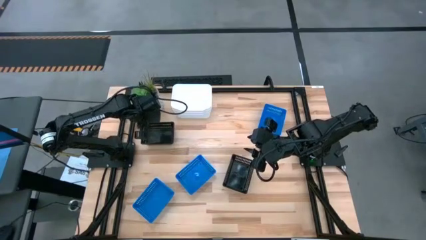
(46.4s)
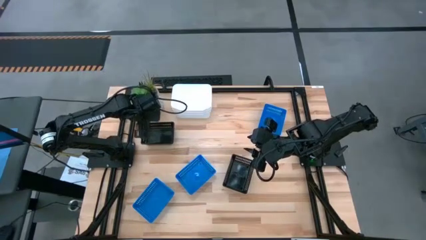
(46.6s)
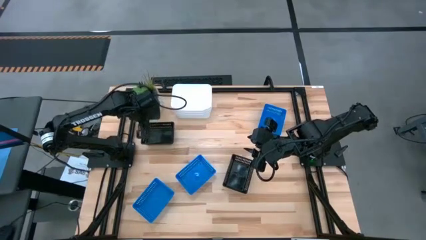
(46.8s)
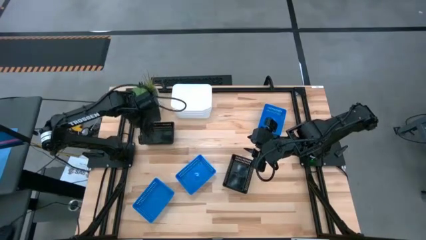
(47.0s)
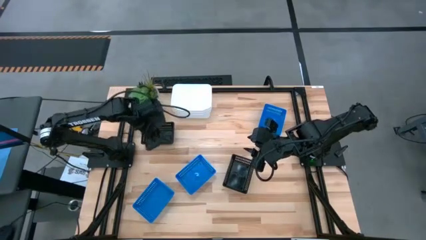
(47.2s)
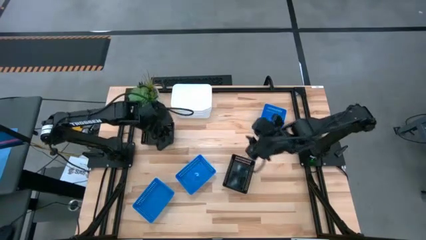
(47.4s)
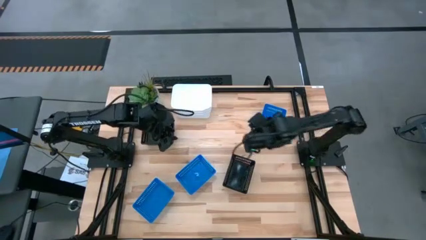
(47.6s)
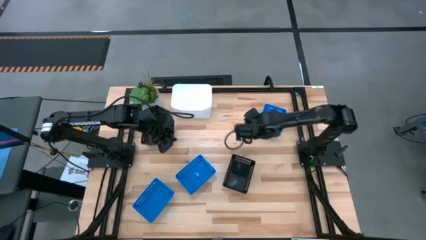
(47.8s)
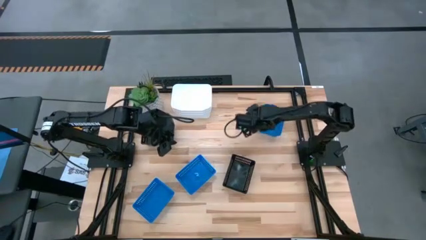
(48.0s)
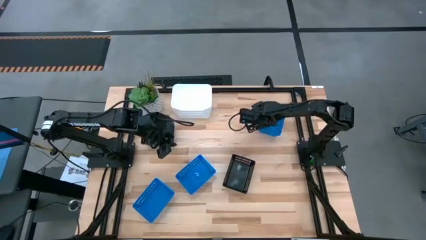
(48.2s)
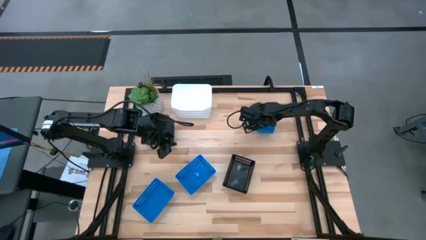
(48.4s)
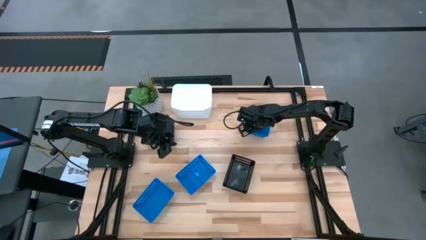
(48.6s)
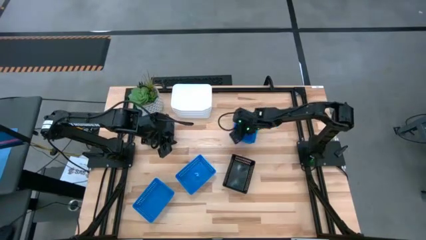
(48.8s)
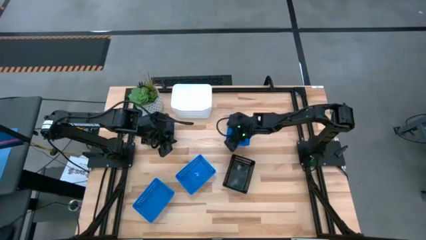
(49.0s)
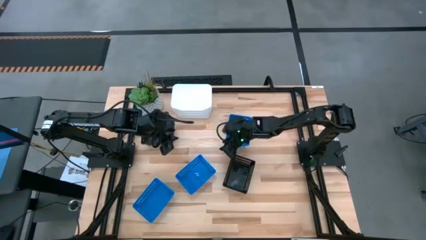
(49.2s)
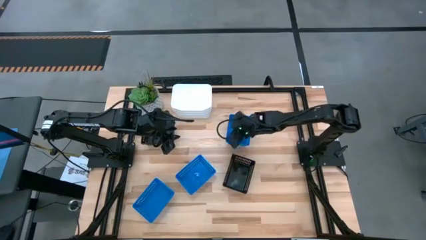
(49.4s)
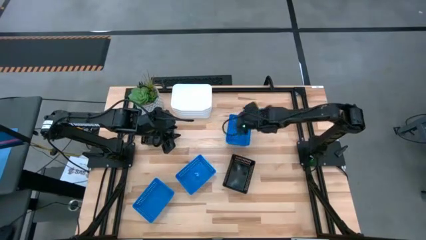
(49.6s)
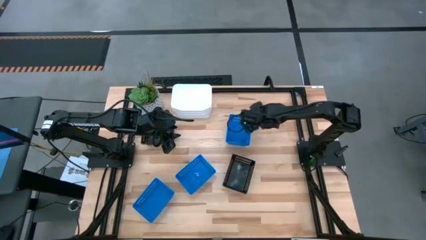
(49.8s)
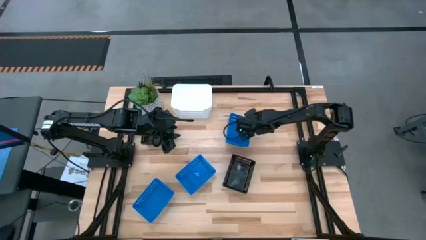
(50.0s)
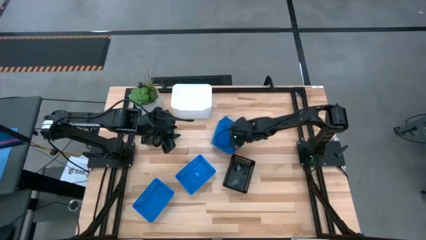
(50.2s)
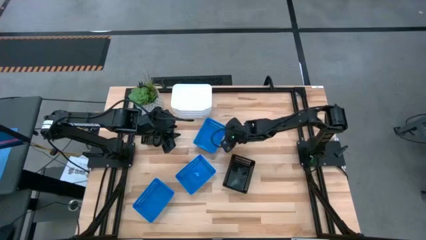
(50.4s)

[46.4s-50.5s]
Move the blue bin from top right to middle table

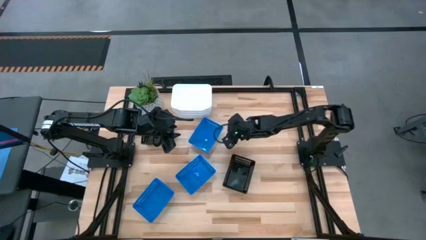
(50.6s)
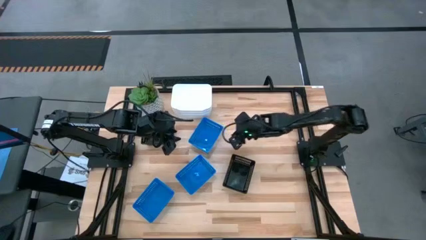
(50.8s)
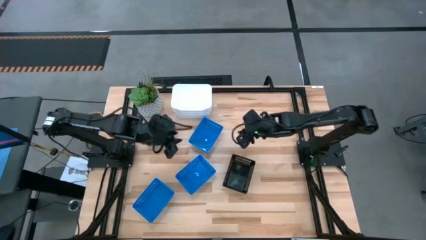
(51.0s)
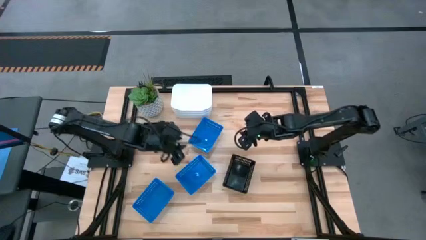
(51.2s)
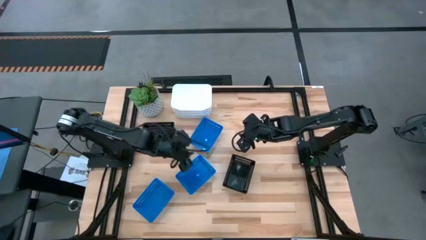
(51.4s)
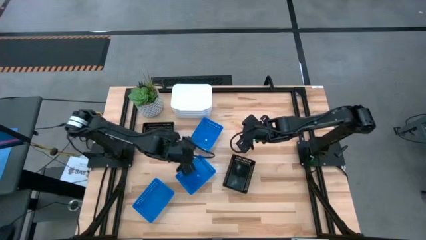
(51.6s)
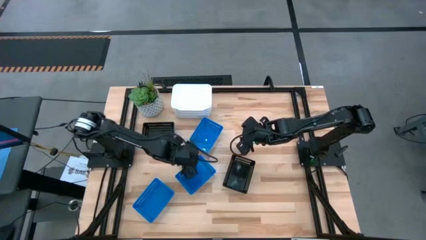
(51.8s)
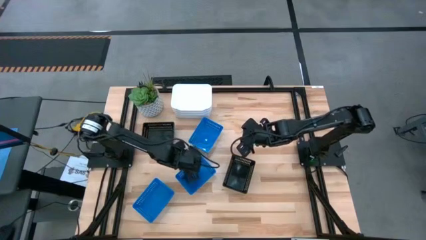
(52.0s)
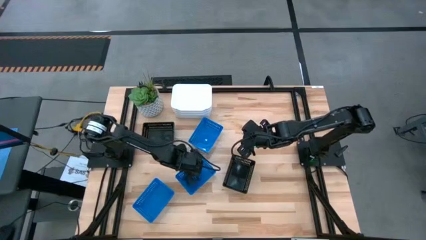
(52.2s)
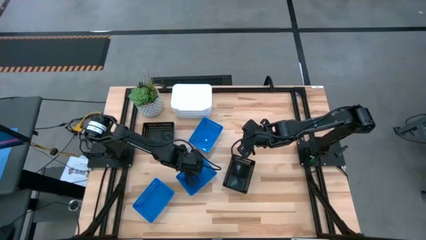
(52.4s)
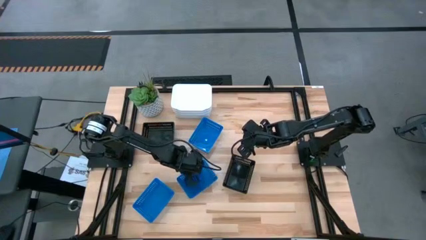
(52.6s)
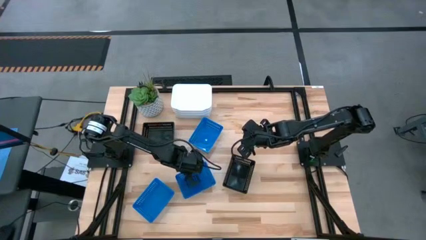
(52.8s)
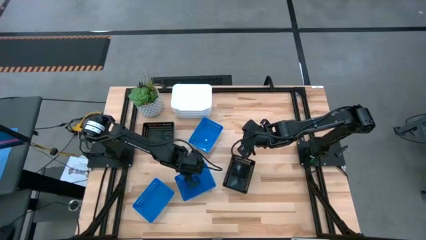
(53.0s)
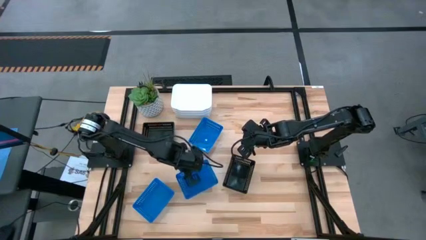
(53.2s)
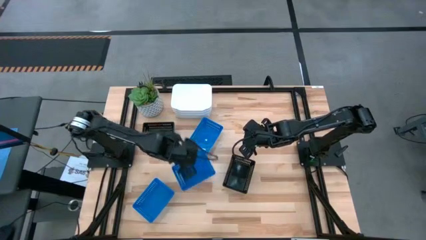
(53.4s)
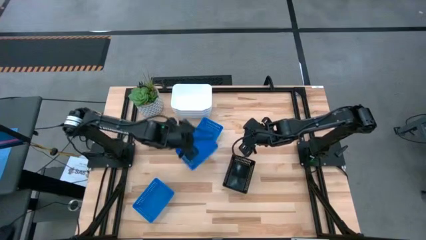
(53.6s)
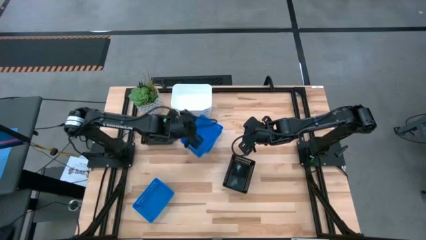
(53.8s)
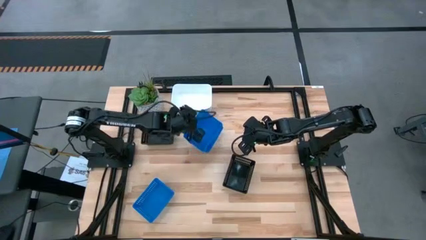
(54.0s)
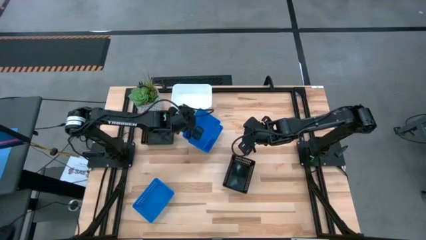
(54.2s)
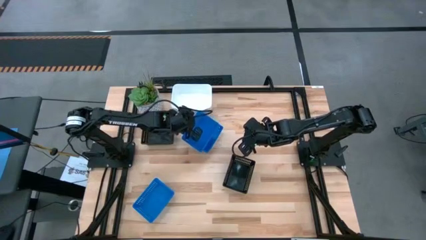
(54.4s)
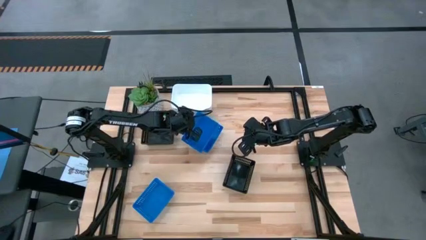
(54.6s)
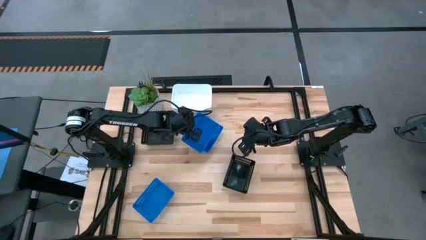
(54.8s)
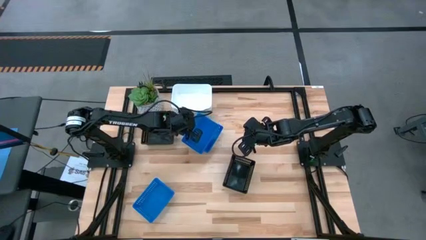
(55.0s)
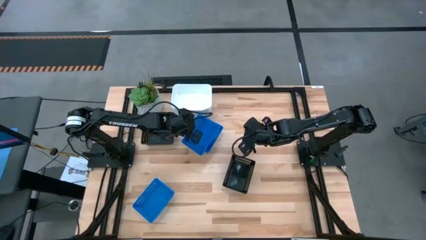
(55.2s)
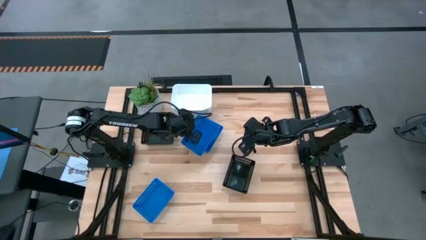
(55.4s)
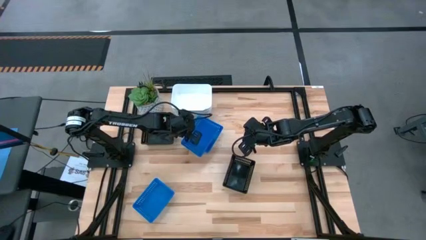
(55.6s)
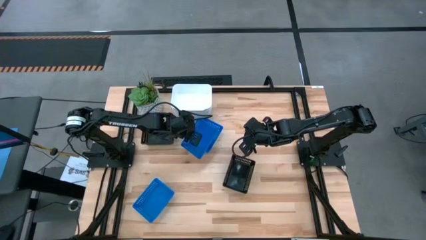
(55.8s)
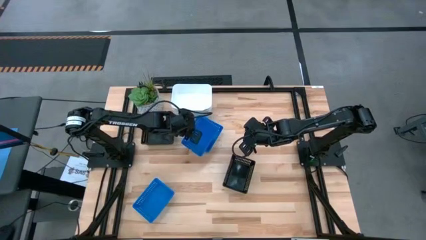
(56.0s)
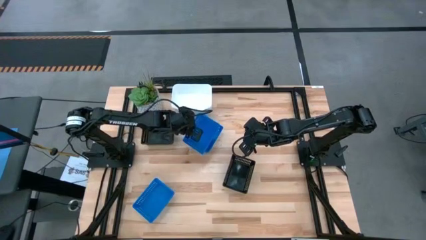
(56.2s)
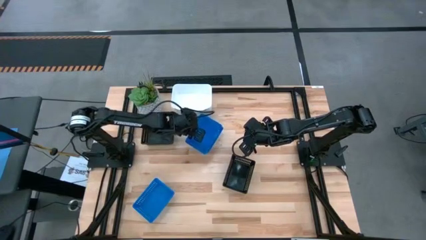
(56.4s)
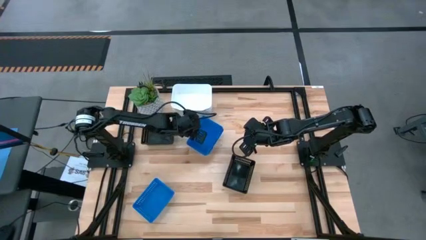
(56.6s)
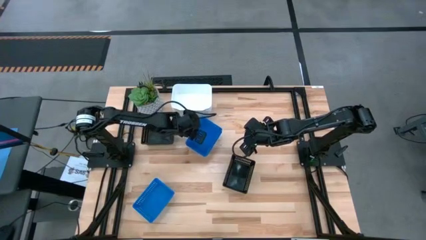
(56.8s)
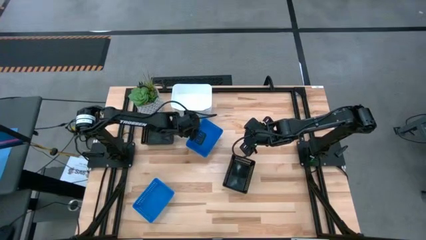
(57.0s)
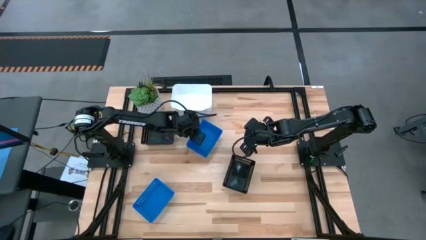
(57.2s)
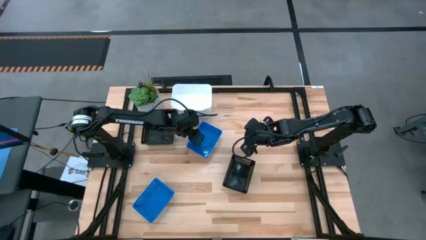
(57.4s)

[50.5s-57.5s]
Stack the middle blue bin on top of the top blue bin

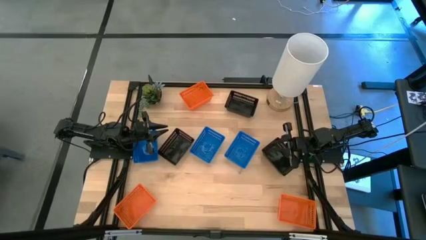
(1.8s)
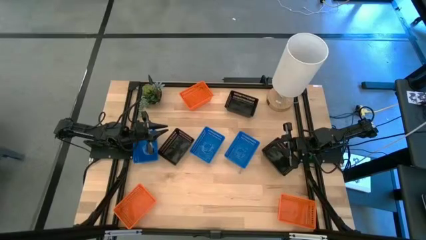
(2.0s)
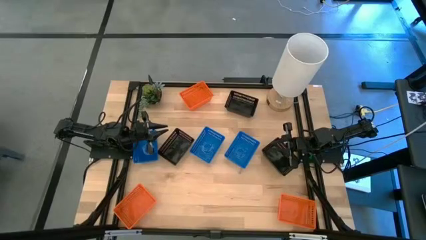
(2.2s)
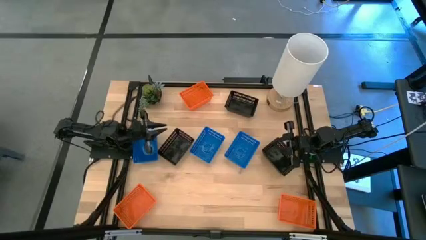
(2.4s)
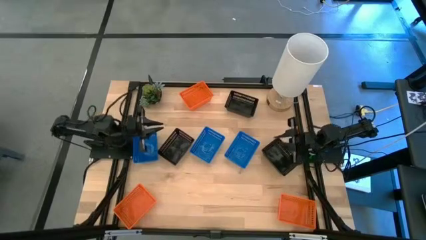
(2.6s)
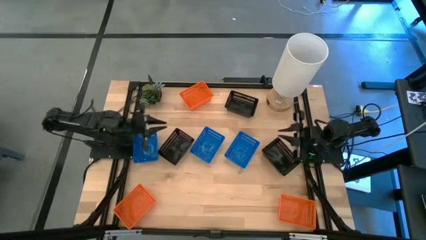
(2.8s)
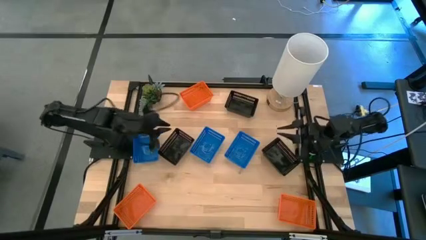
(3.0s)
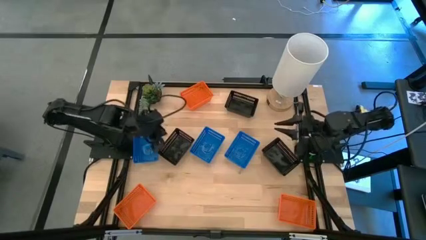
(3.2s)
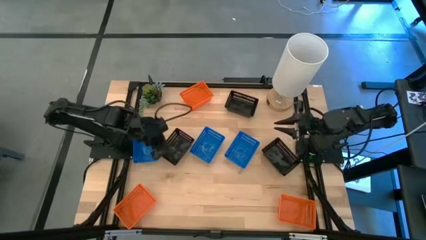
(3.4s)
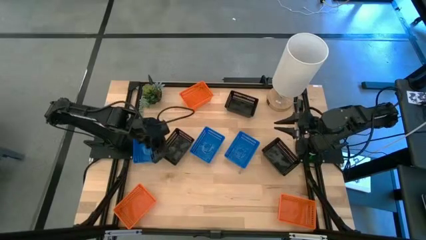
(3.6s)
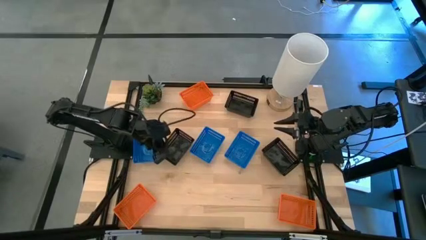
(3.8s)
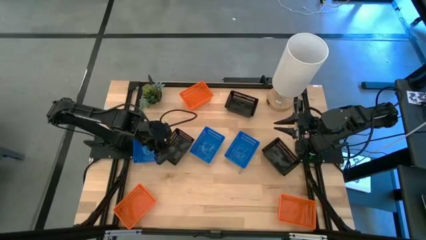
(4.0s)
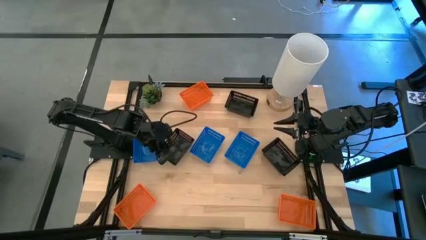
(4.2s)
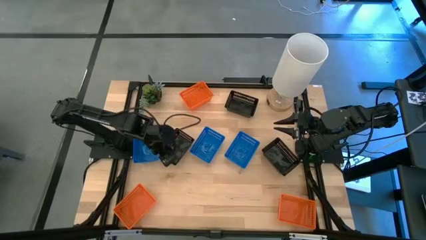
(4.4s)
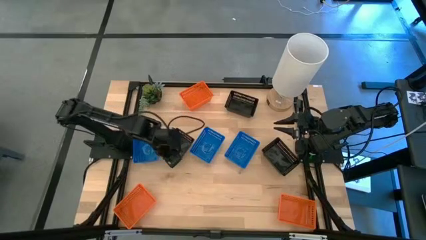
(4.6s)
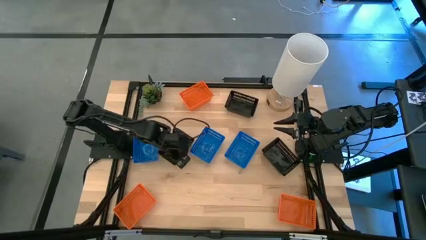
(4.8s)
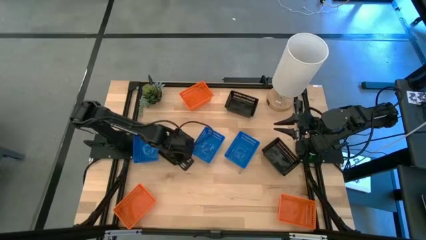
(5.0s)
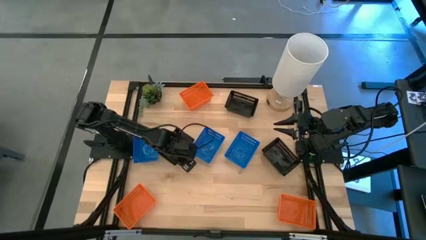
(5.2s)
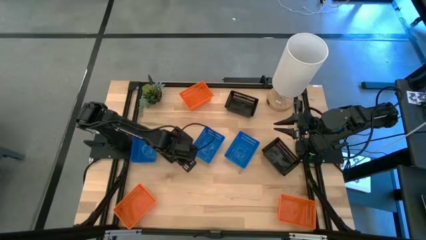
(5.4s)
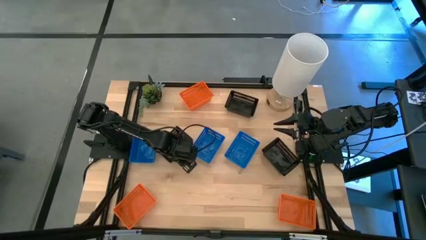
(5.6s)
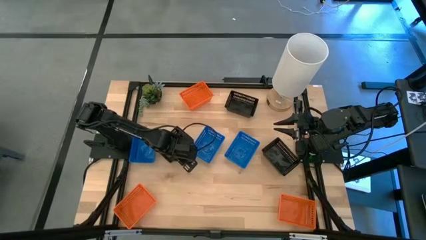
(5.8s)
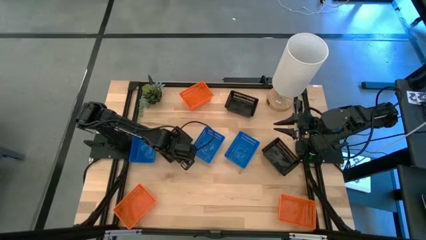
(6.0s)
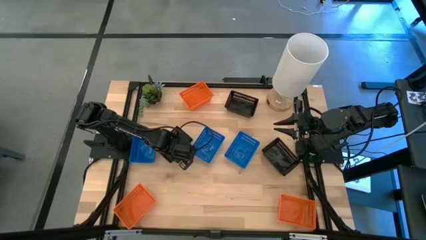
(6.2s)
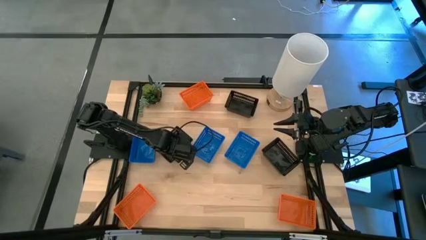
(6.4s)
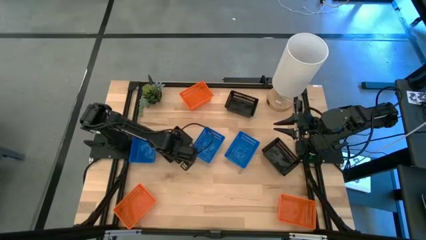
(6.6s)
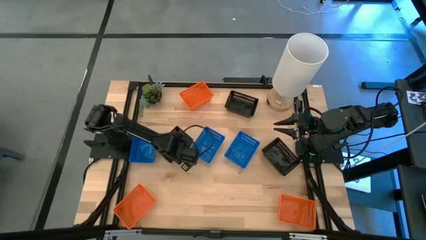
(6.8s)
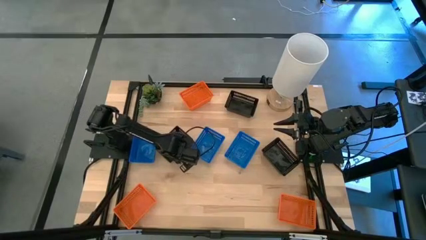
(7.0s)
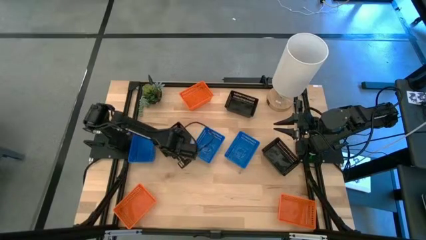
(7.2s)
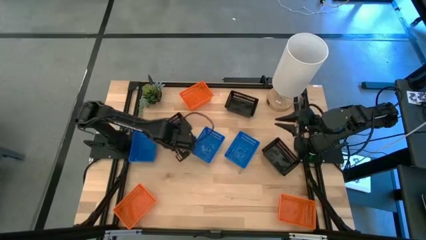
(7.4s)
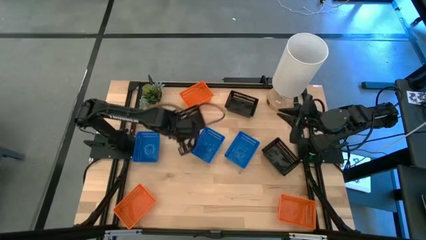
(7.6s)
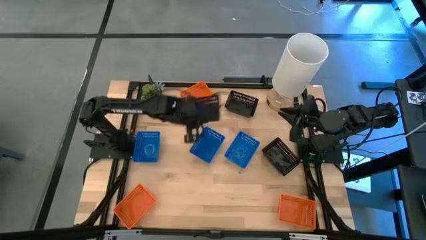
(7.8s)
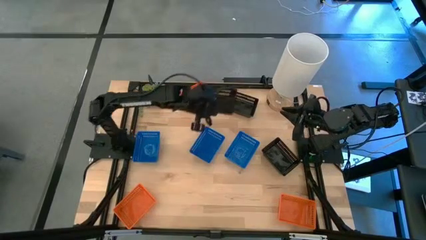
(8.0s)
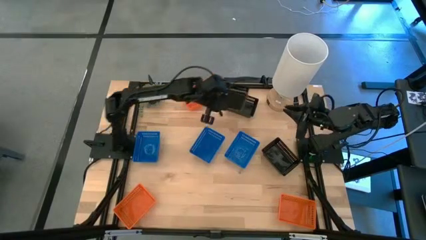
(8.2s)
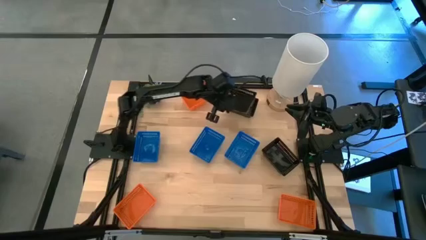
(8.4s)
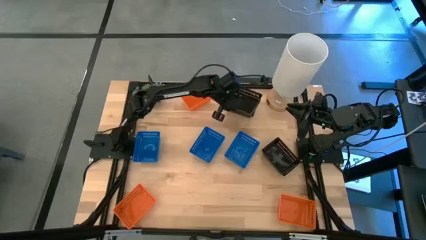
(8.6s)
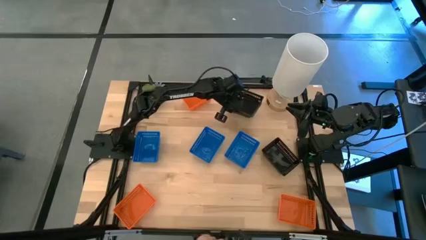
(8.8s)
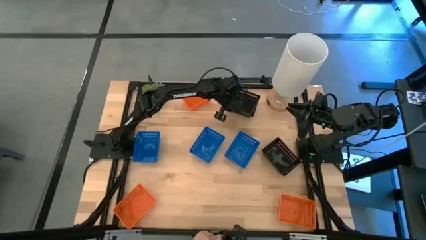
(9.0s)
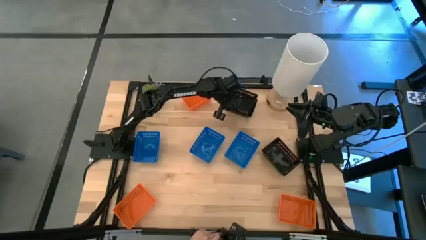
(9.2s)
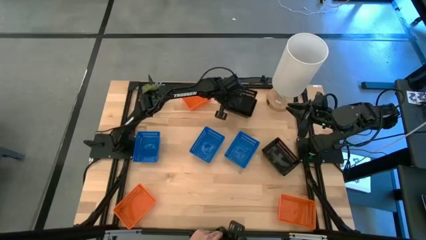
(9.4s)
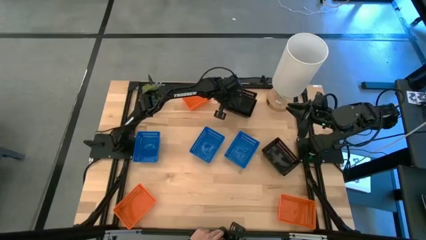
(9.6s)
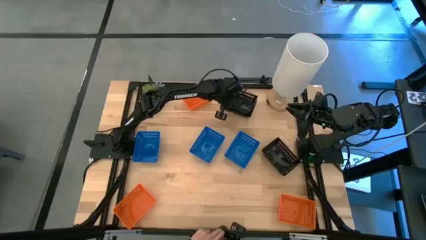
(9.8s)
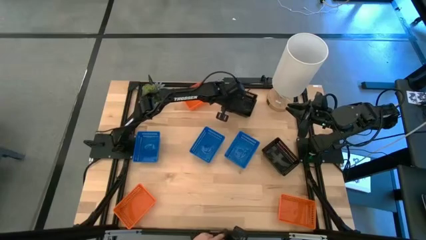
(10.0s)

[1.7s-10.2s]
Stack the bottom left black bin on the top black bin
